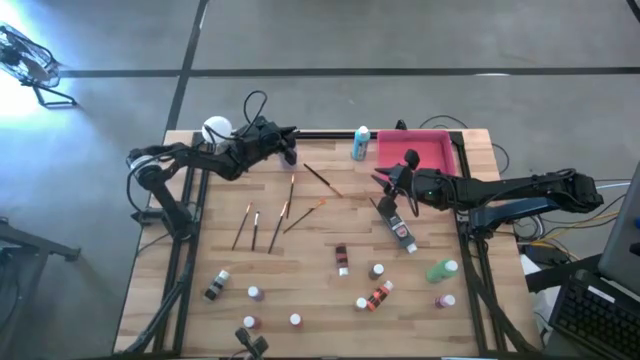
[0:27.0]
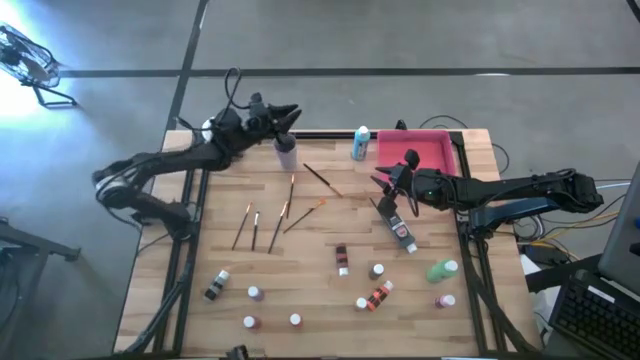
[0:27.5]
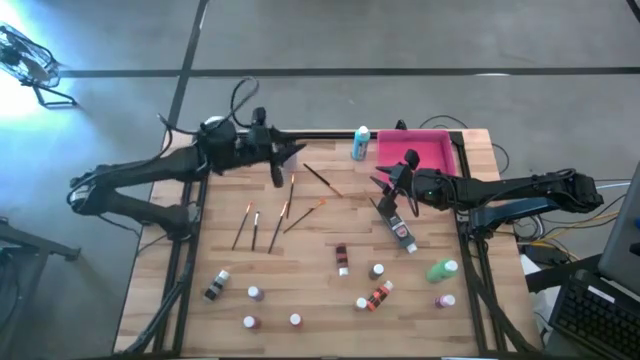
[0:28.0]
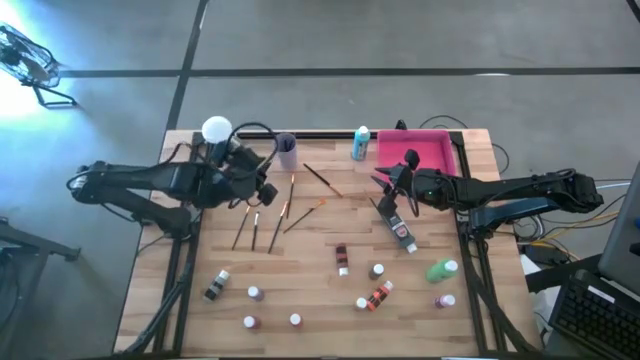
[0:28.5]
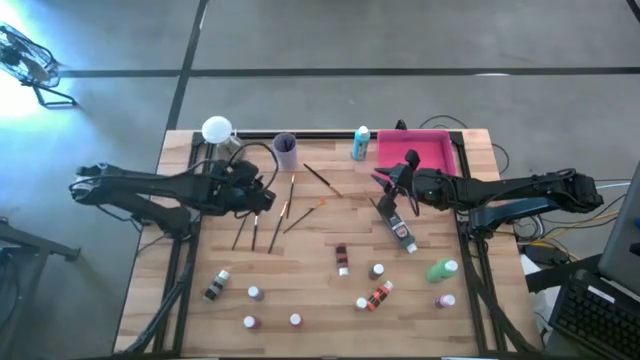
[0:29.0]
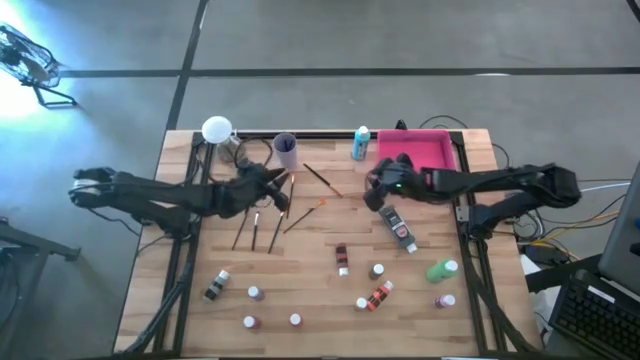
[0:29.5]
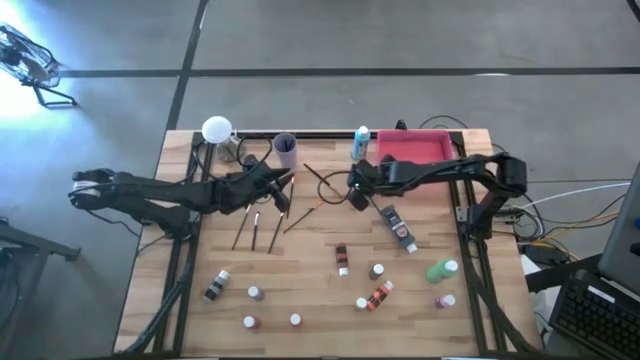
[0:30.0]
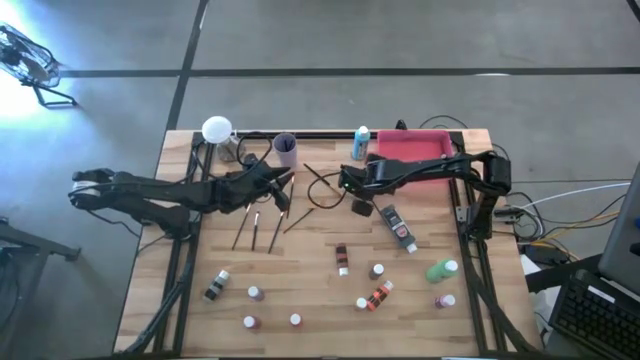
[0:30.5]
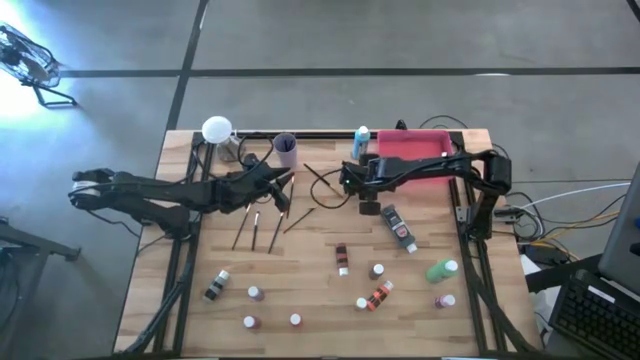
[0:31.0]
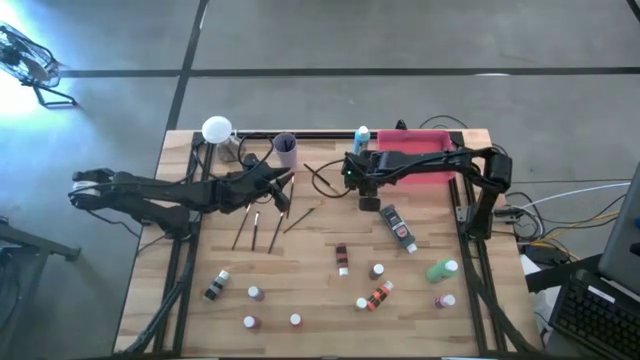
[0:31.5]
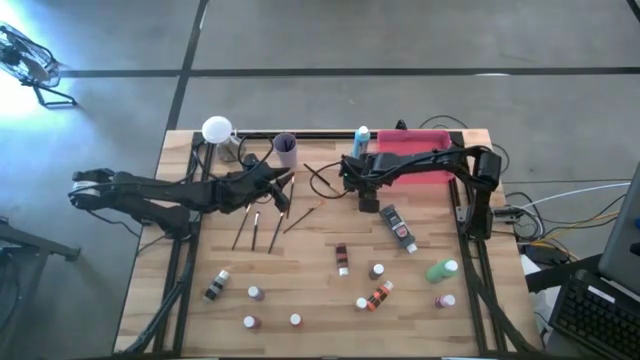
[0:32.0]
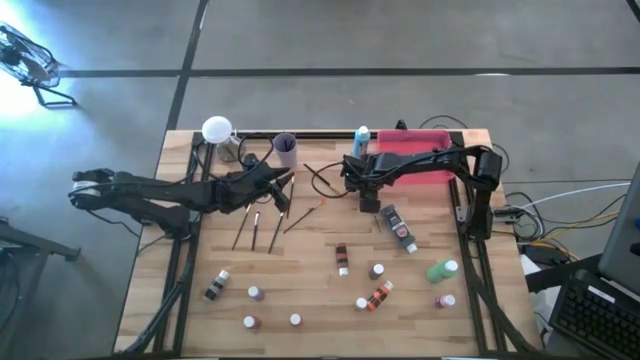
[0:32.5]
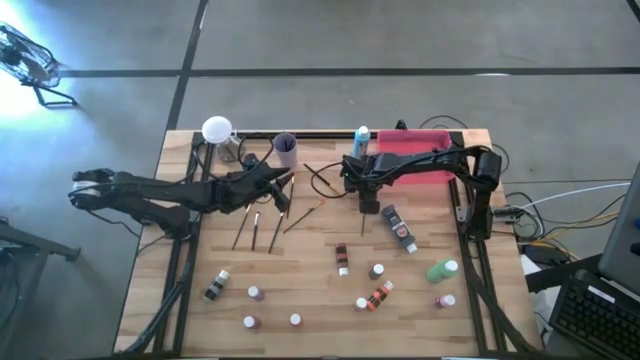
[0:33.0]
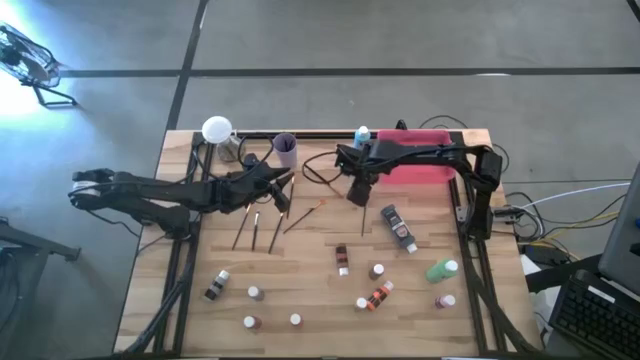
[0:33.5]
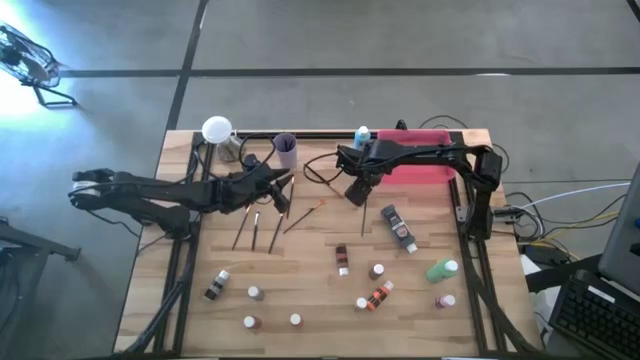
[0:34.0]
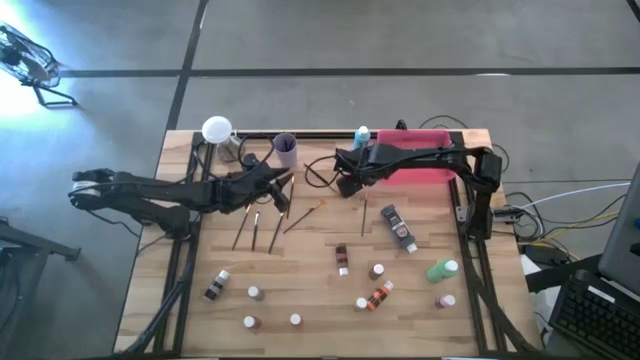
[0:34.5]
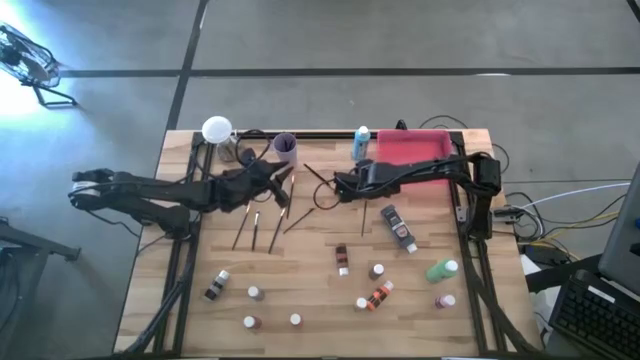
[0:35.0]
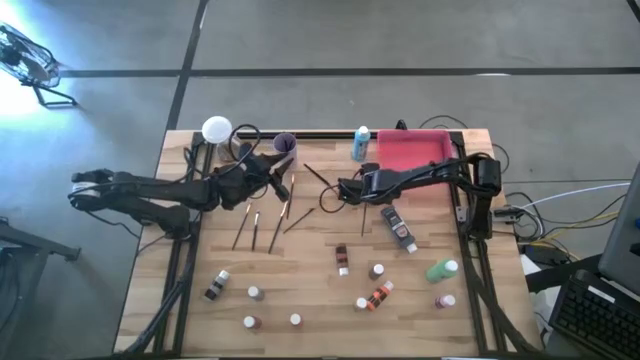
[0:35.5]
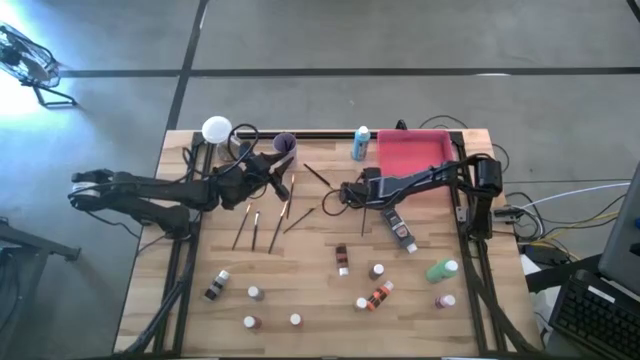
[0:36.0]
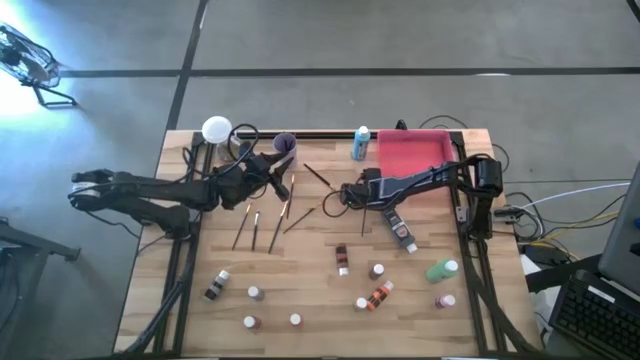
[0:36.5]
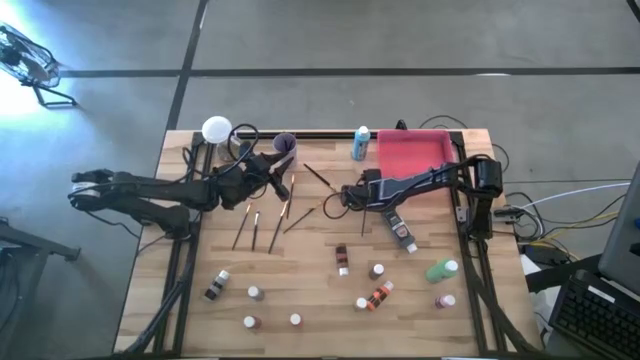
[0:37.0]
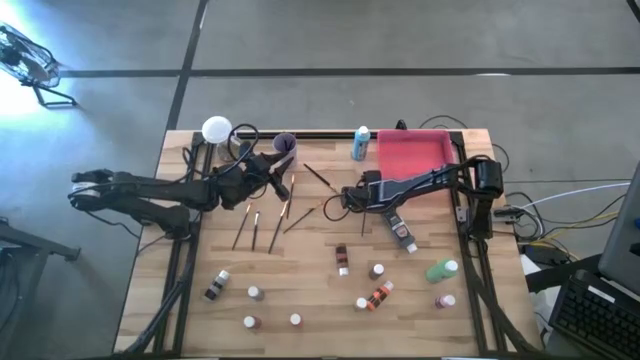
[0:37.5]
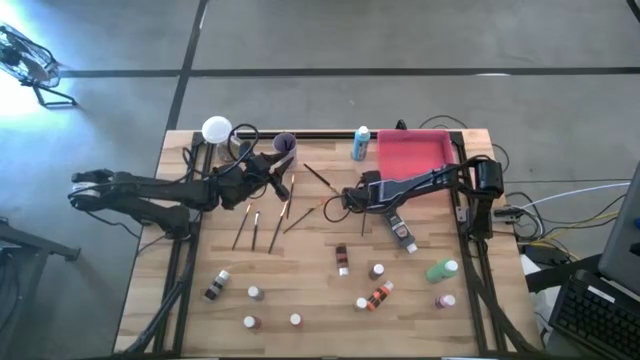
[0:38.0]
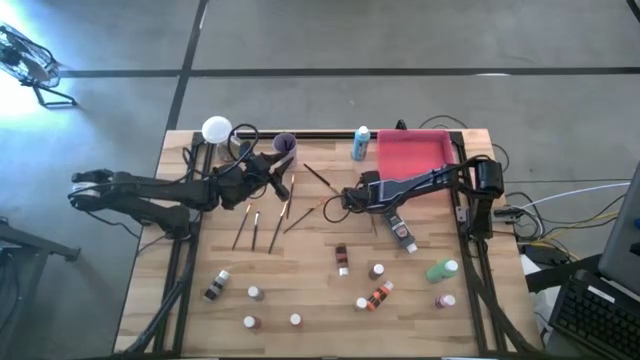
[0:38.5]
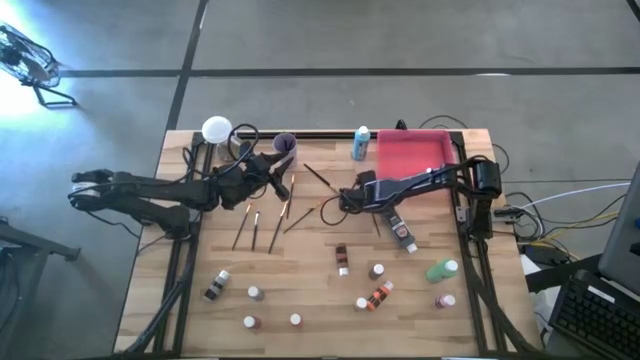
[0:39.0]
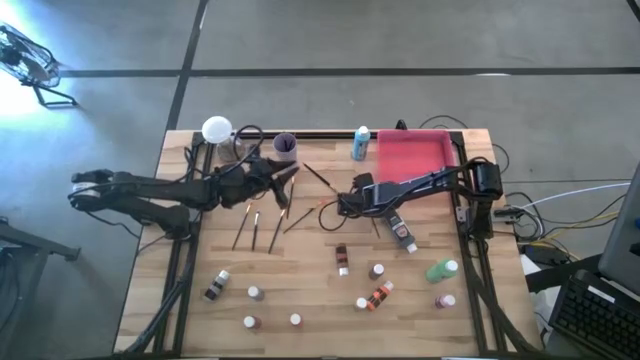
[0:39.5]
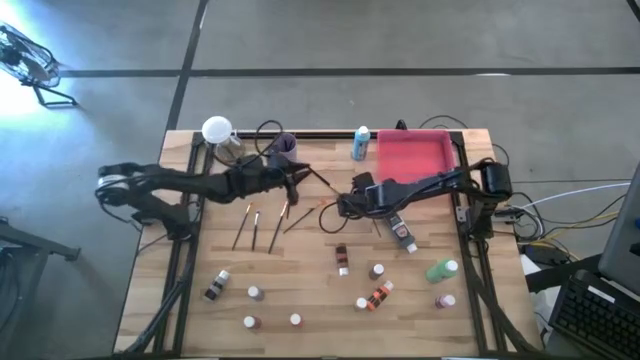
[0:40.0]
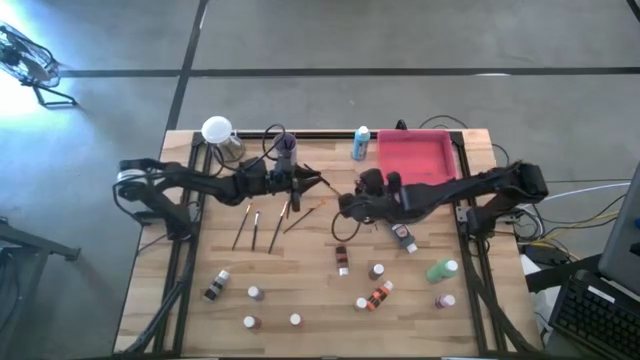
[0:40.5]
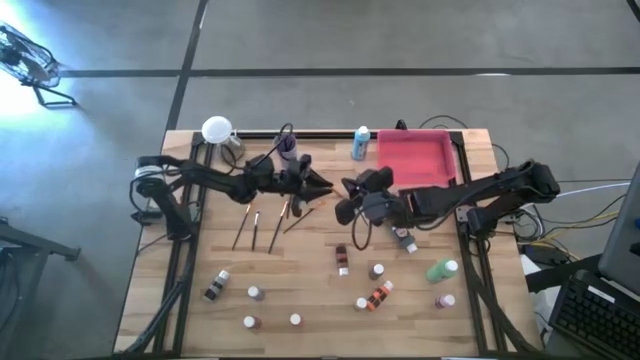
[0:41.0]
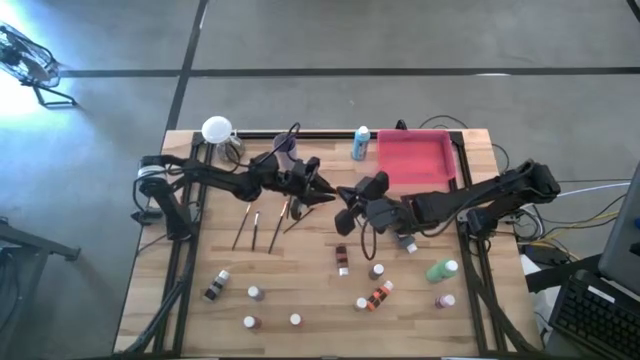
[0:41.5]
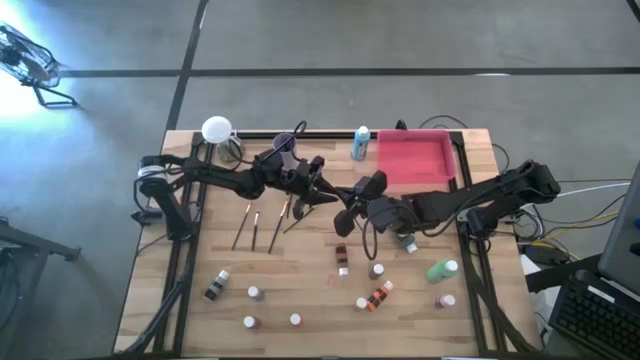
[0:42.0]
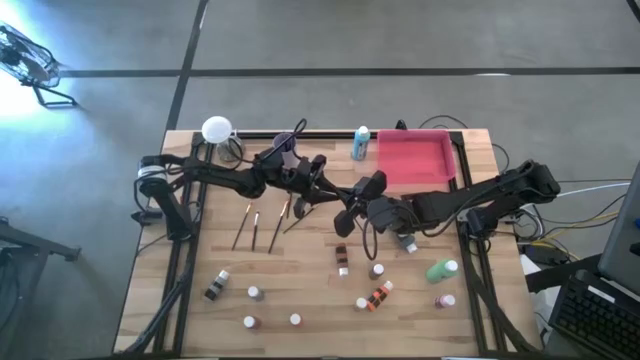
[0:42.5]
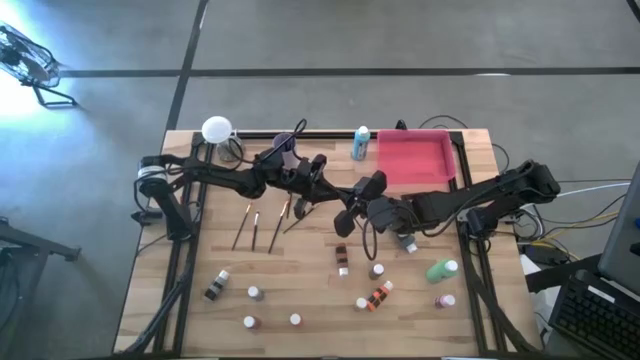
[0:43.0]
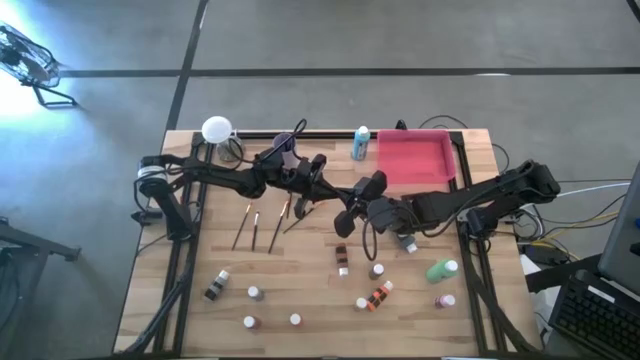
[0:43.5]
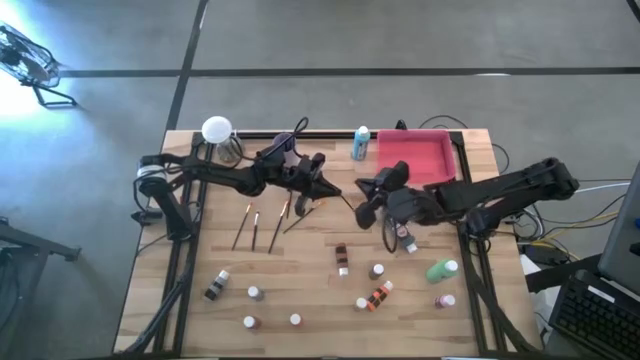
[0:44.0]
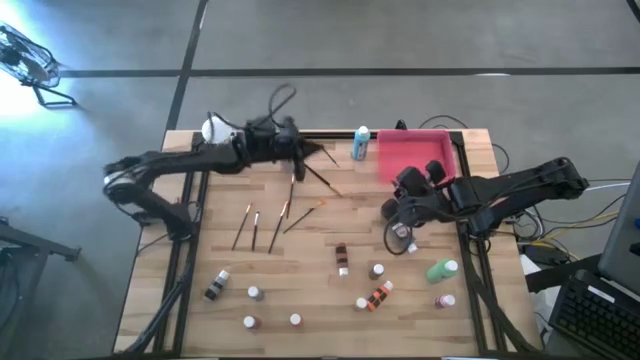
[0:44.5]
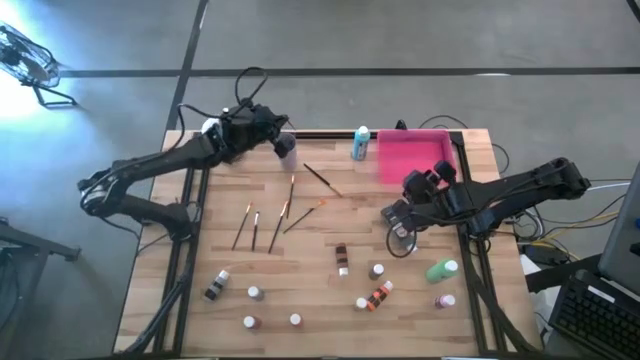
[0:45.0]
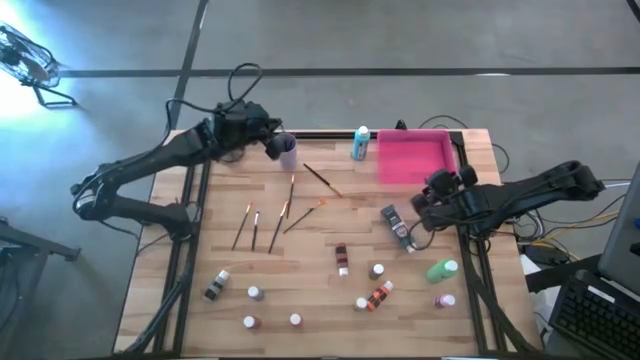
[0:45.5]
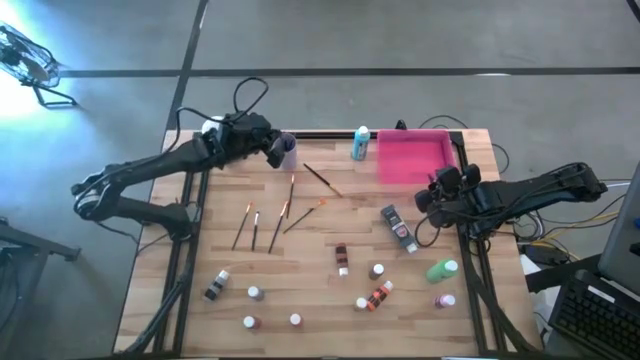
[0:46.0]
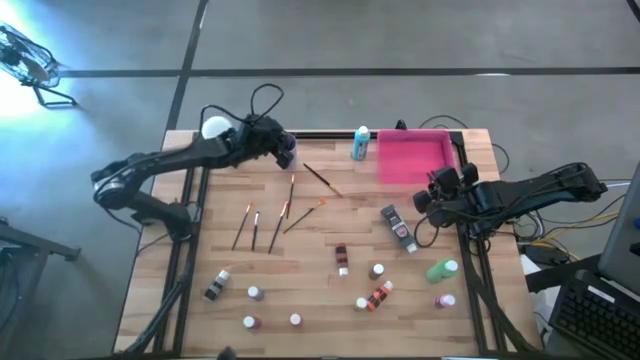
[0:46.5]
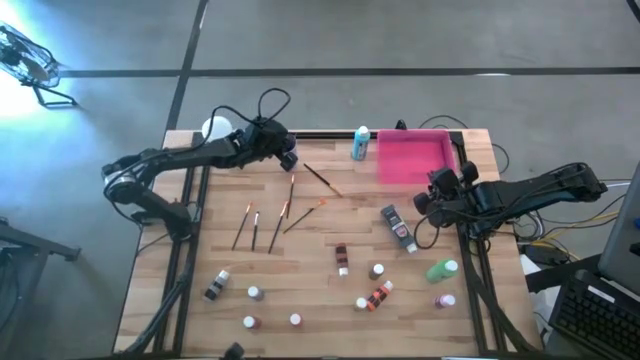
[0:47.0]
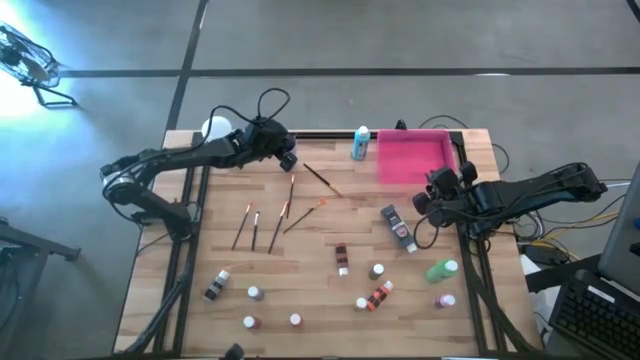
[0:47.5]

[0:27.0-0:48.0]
Task: Pick & Place Paint Supplies
Put the gold black paint brush into the purple cup
